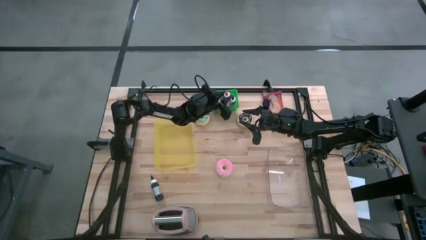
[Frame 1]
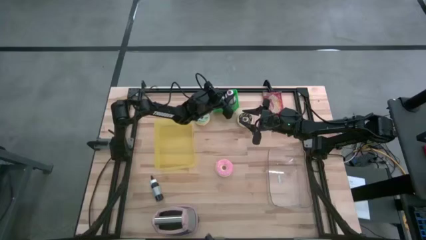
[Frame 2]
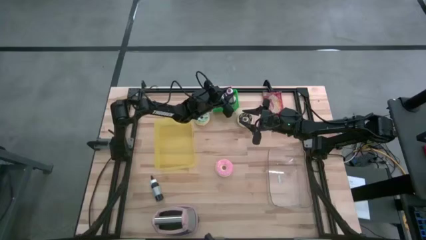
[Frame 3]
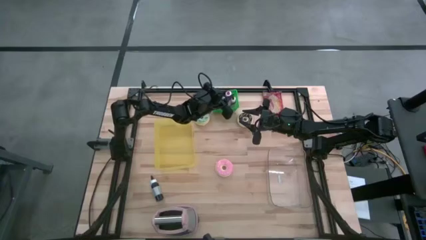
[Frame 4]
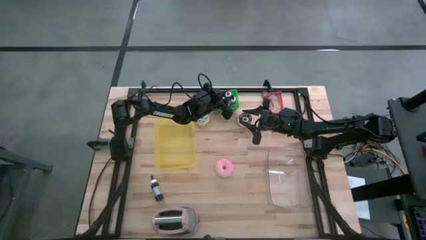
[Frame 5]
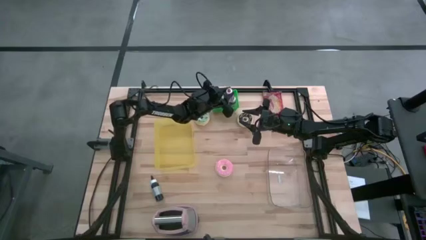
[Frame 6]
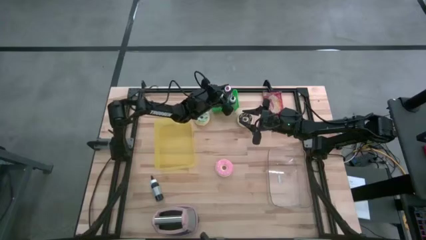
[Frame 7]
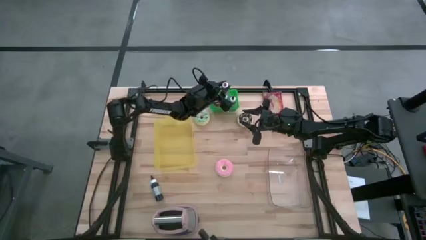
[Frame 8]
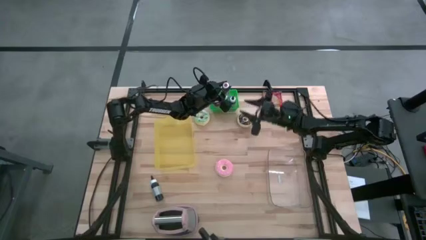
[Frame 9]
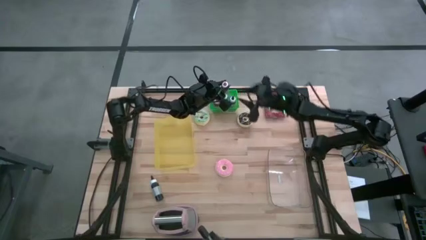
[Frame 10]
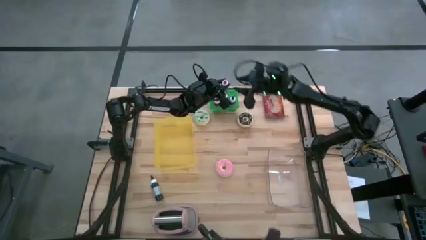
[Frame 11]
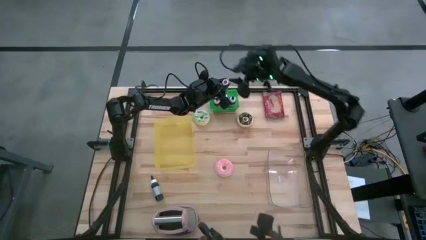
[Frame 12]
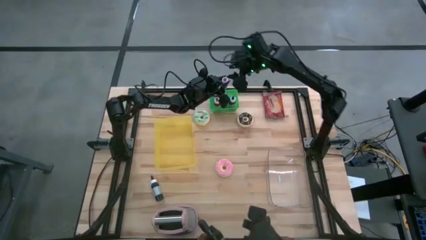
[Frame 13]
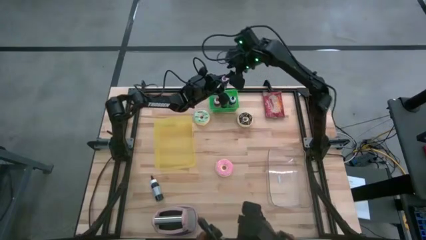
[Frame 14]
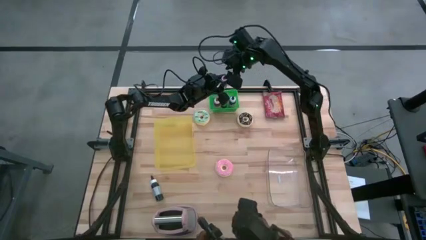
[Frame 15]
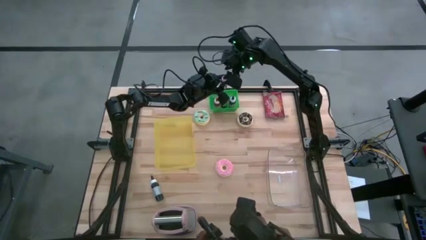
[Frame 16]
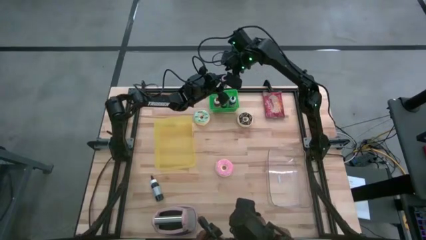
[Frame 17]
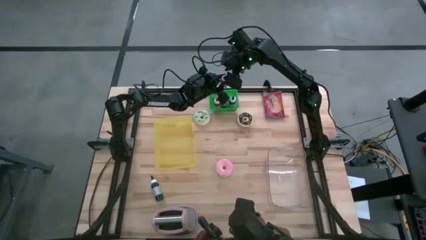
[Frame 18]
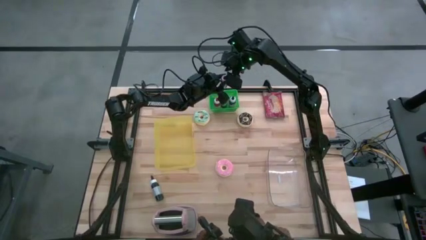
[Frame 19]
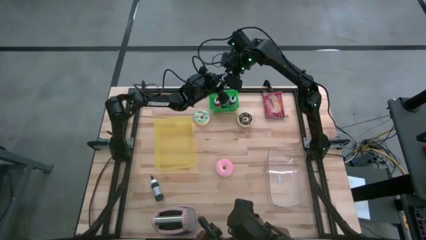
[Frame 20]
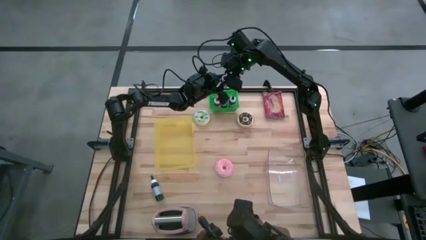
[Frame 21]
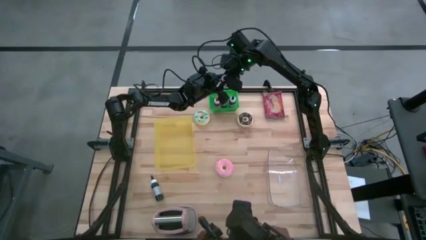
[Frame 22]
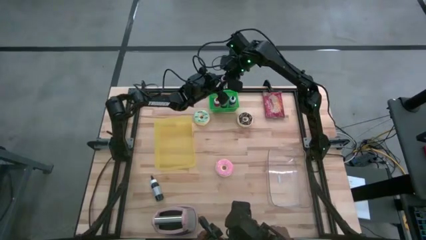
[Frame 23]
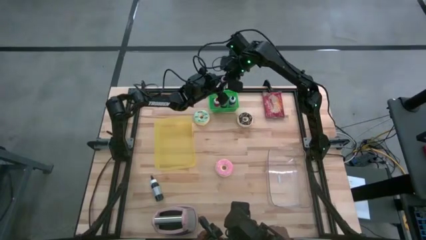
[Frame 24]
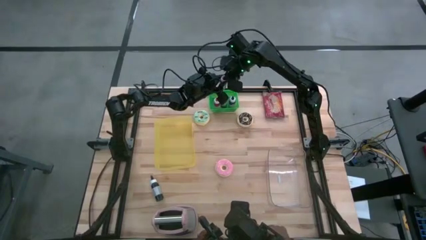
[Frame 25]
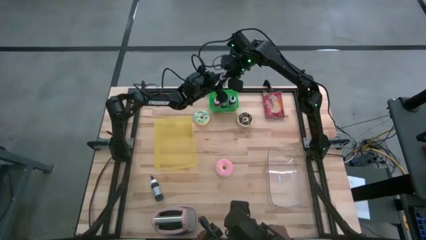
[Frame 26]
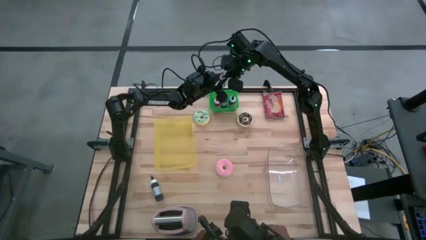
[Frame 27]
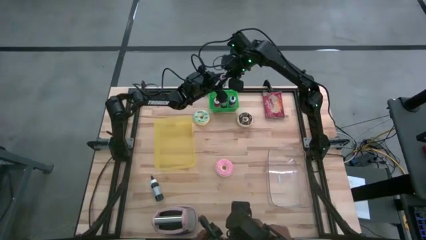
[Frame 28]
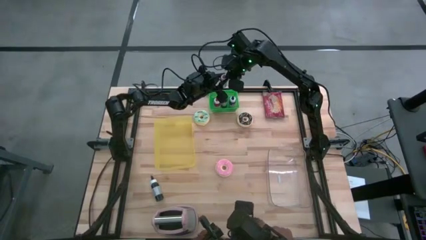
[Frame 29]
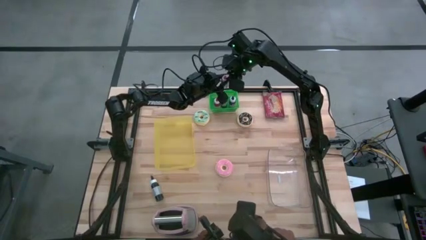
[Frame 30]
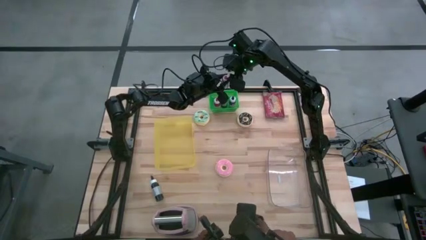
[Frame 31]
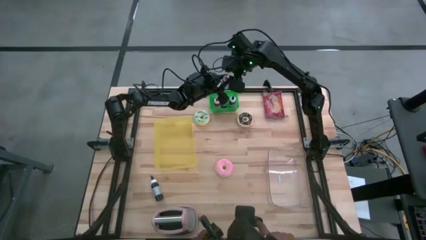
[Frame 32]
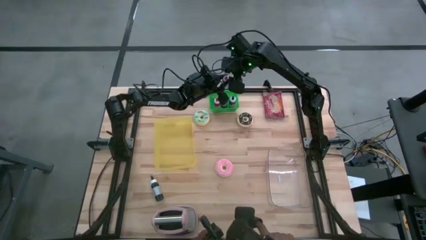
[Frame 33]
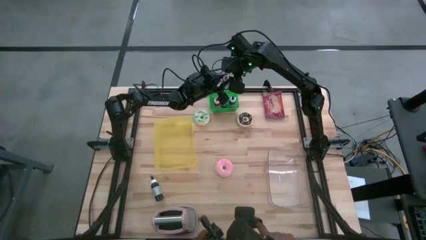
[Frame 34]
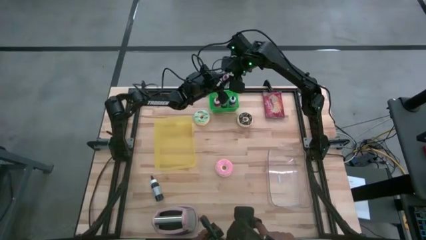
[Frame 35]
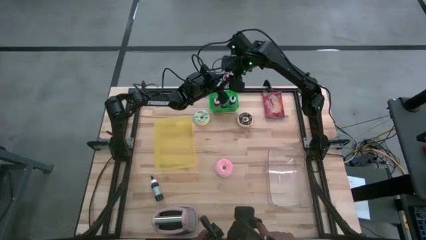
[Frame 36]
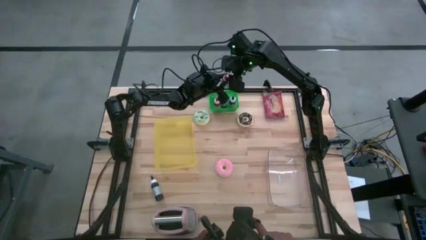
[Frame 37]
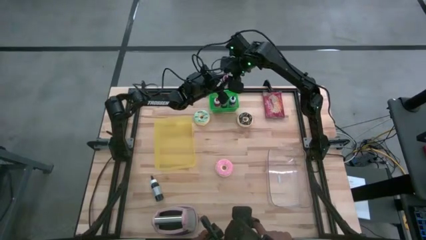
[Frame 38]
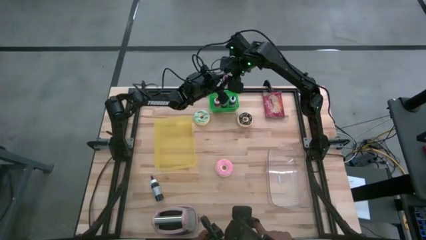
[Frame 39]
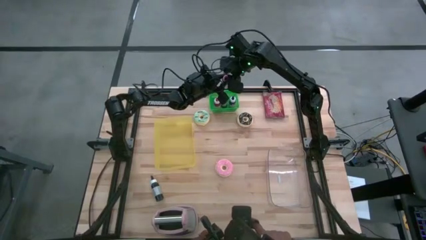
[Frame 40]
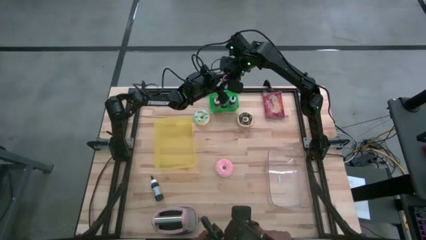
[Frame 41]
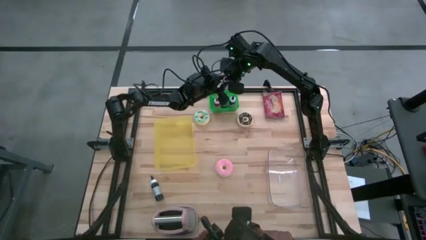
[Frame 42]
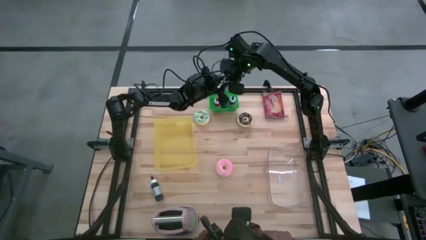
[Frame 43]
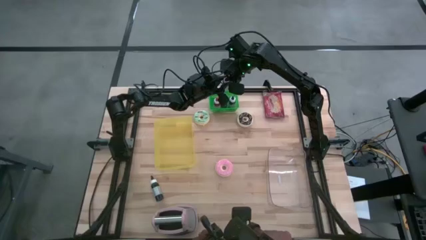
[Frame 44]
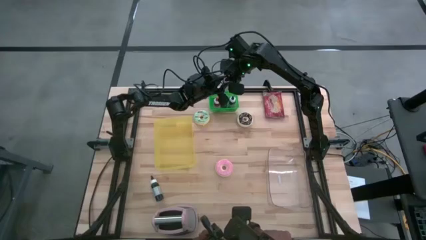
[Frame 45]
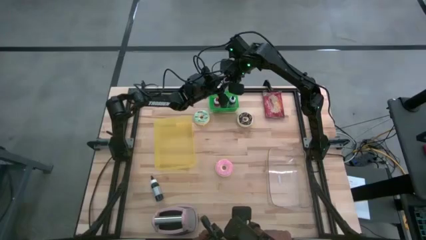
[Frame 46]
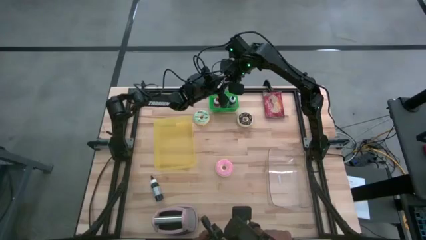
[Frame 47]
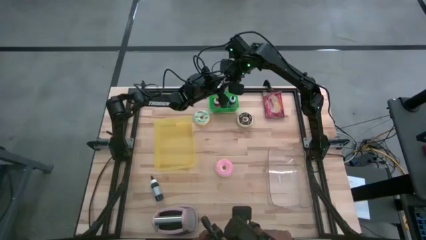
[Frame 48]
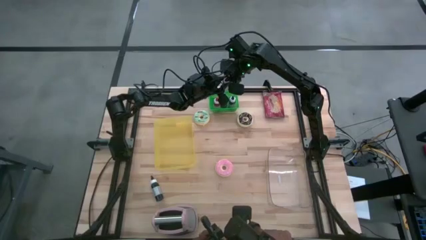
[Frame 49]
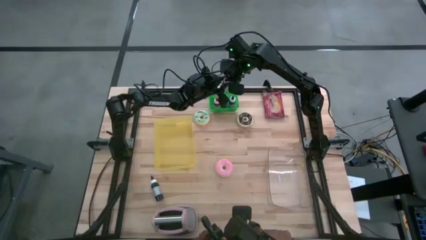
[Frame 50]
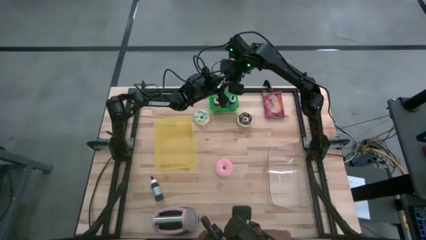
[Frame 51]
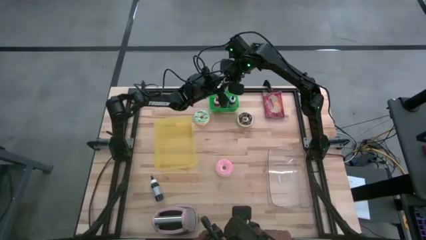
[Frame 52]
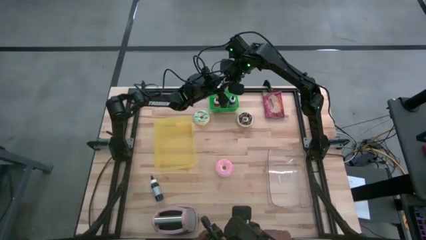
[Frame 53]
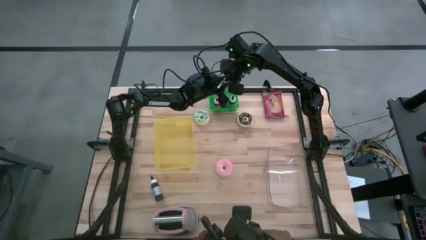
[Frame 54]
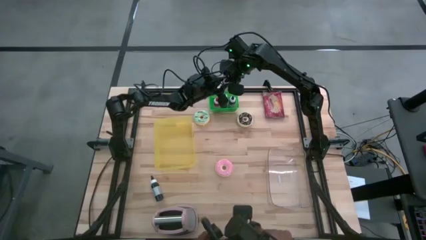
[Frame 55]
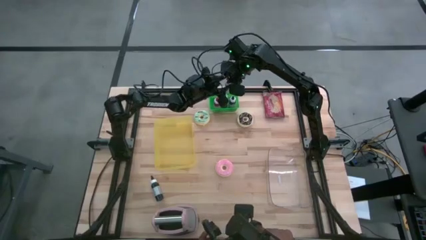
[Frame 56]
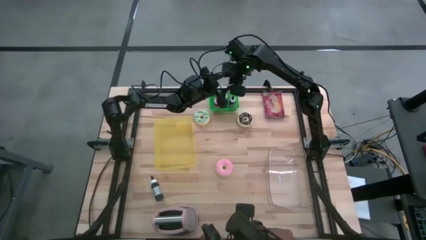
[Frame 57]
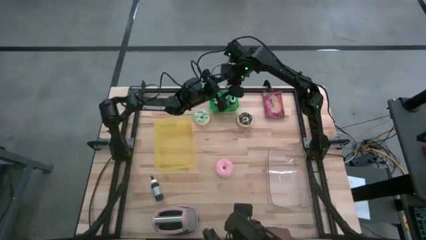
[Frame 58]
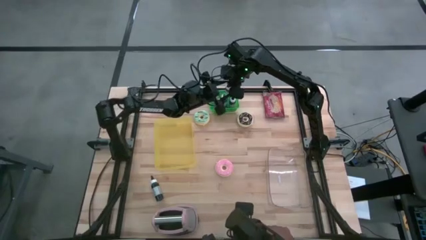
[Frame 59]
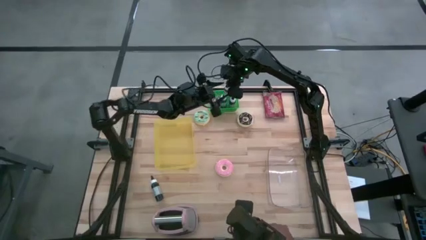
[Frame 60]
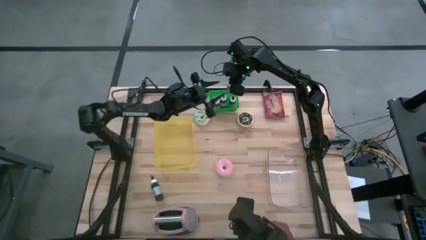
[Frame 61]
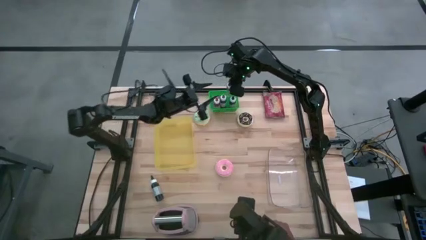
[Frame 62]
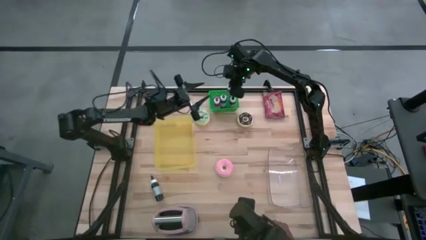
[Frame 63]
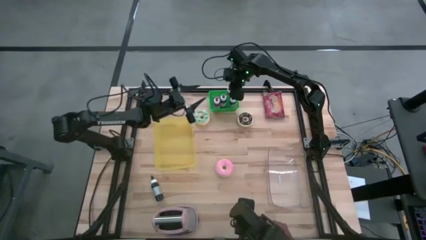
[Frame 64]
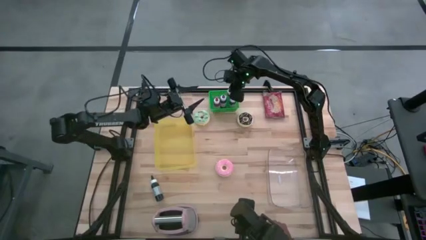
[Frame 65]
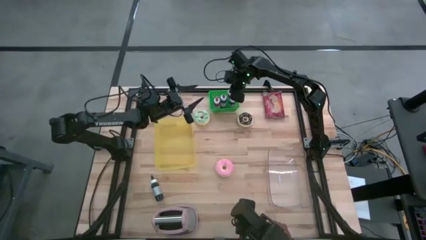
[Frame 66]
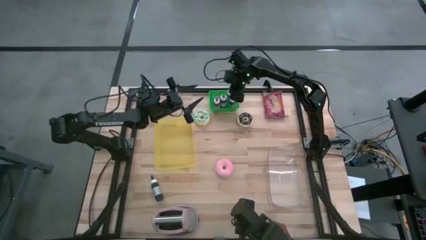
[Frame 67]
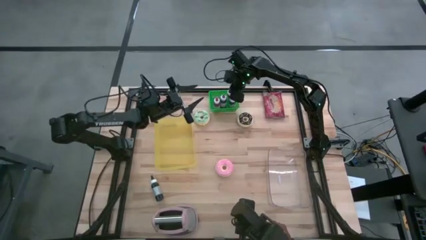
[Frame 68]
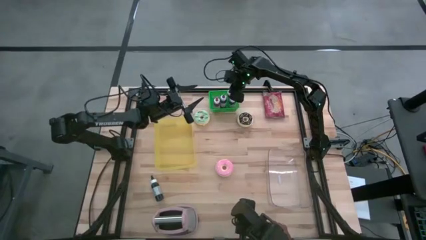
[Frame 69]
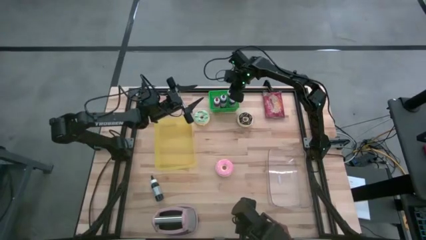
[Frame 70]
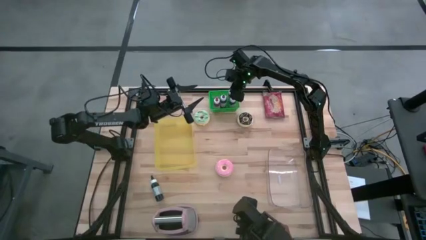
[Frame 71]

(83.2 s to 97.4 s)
Task: Pick & Place Food Item
Put the pink food coloring bottle into the green bin

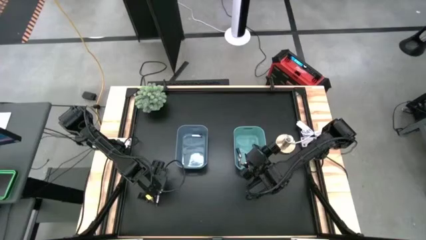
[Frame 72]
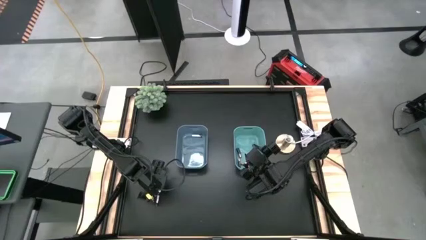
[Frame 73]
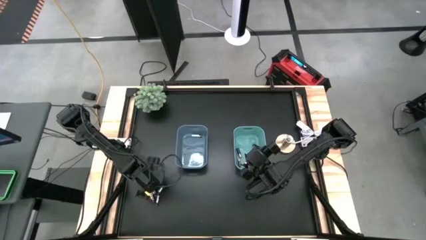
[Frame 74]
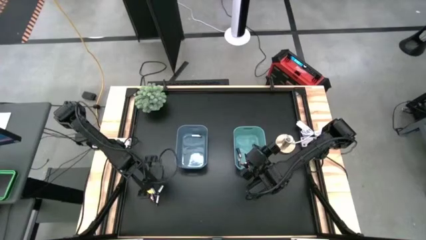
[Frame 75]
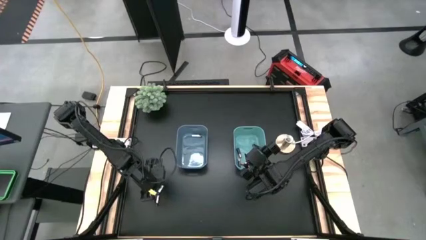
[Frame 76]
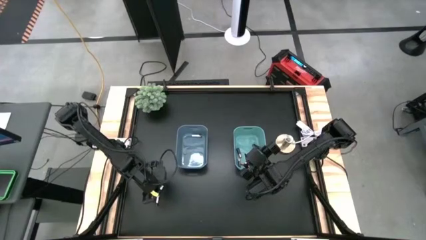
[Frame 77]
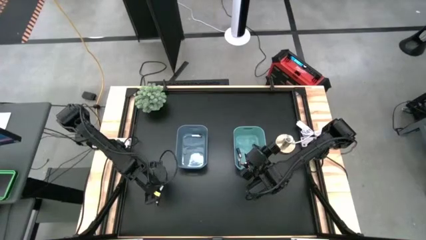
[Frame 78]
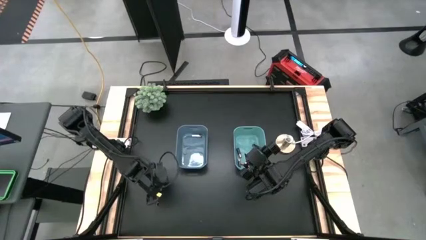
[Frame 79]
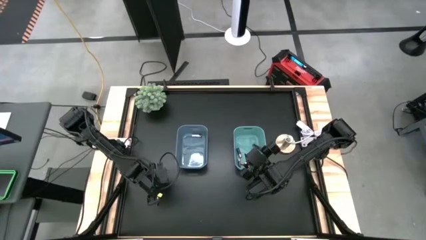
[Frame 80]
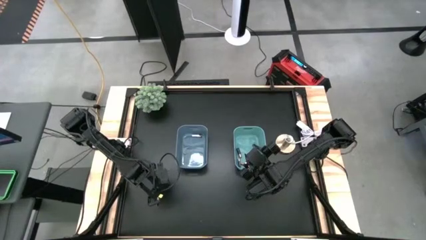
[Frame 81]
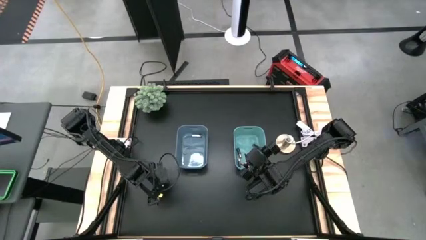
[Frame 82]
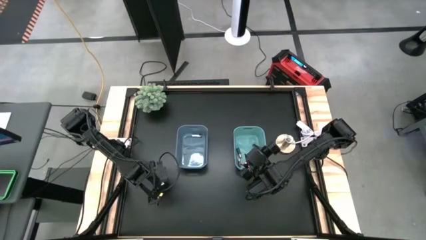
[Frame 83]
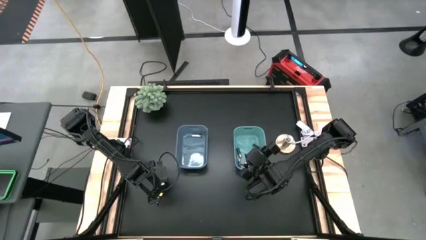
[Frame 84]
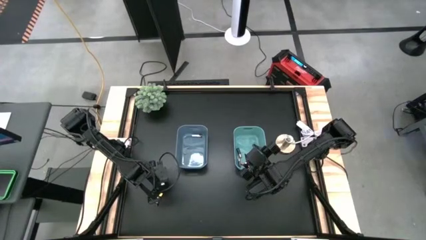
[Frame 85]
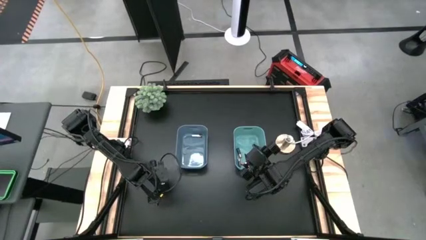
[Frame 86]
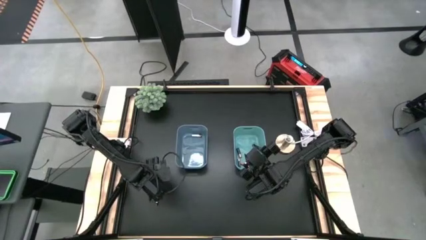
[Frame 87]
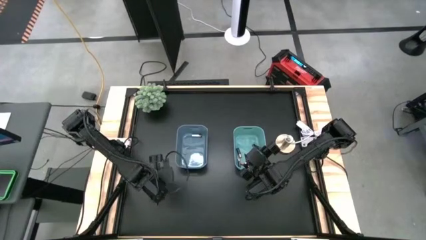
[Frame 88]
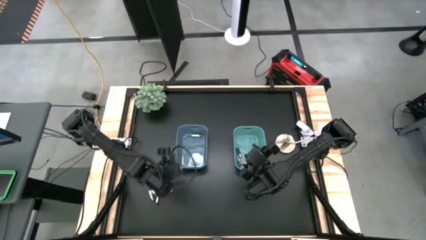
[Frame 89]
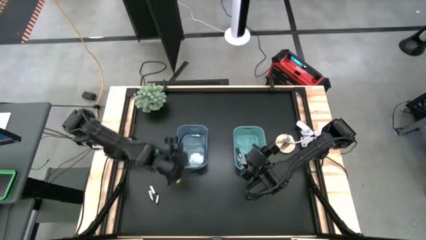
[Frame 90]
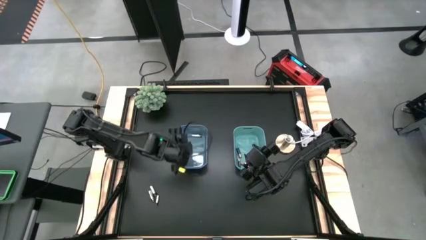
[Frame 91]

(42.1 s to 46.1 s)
Task: Sort batteries
Put the small silver battery into the blue bin
